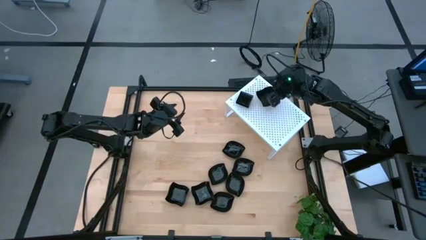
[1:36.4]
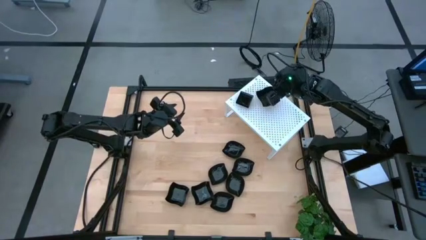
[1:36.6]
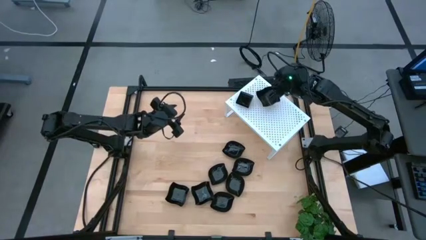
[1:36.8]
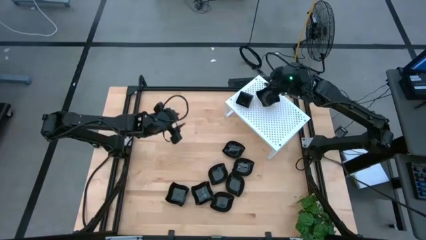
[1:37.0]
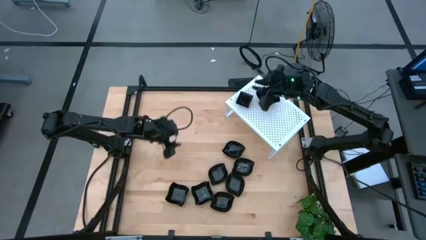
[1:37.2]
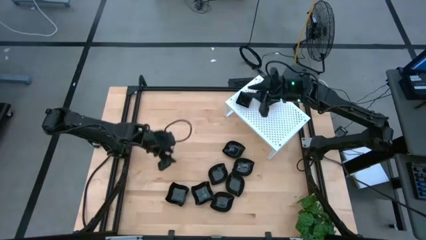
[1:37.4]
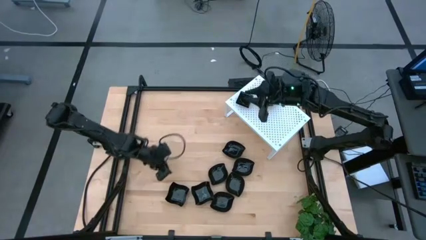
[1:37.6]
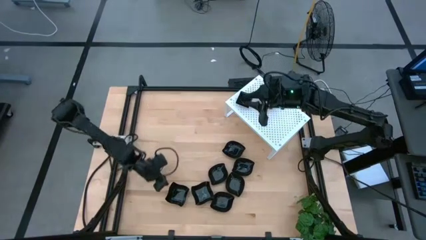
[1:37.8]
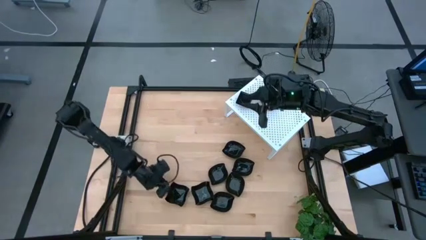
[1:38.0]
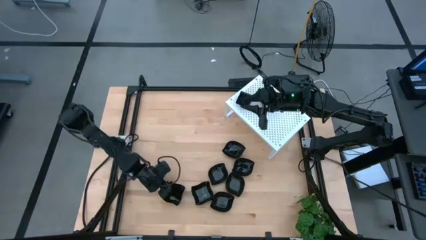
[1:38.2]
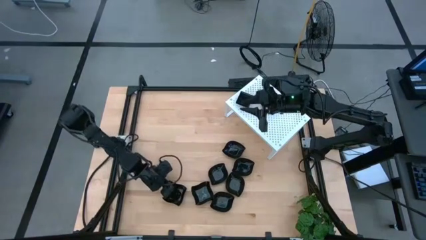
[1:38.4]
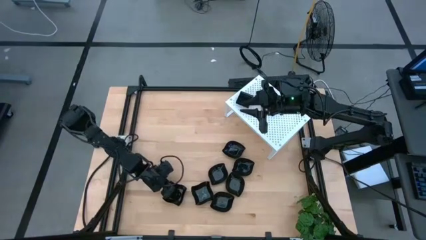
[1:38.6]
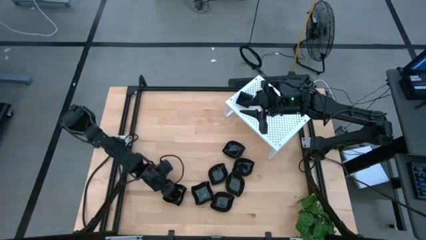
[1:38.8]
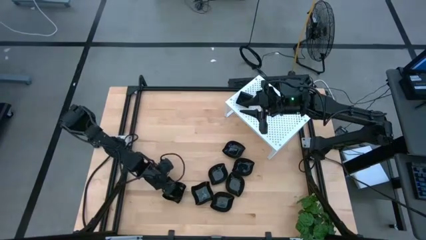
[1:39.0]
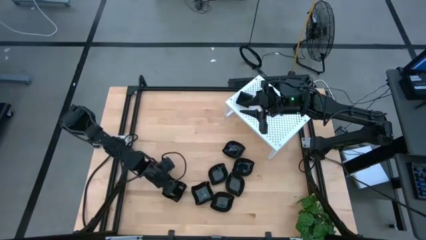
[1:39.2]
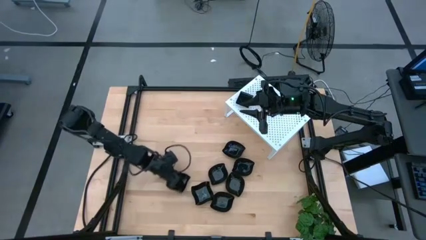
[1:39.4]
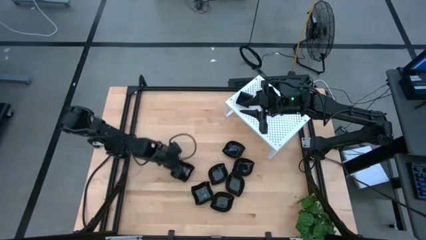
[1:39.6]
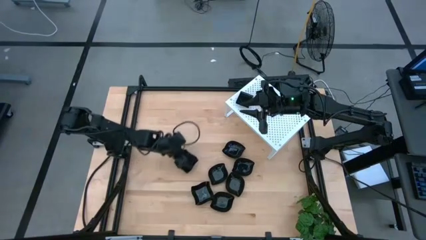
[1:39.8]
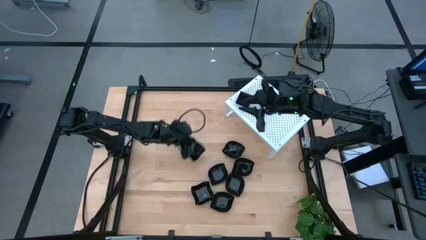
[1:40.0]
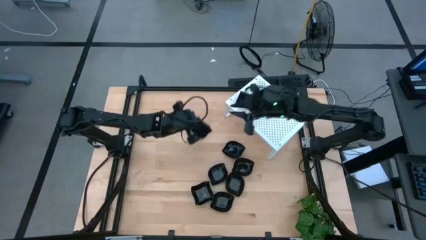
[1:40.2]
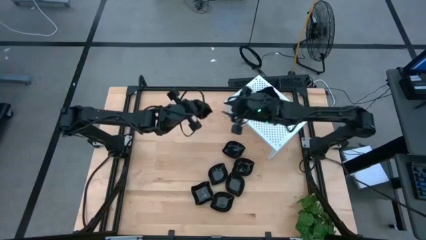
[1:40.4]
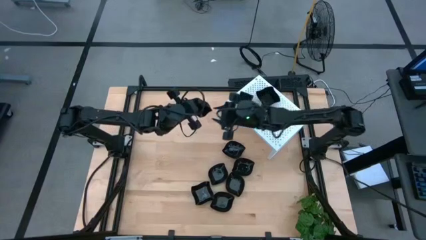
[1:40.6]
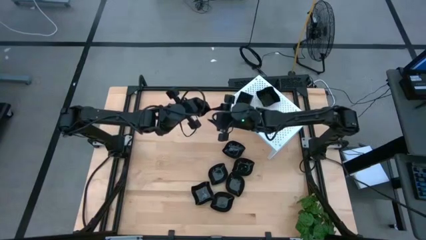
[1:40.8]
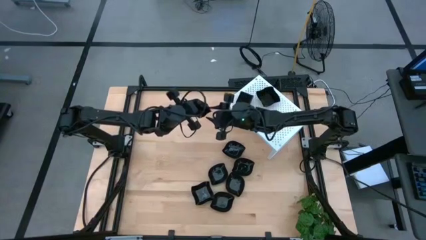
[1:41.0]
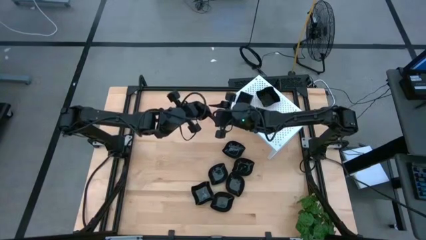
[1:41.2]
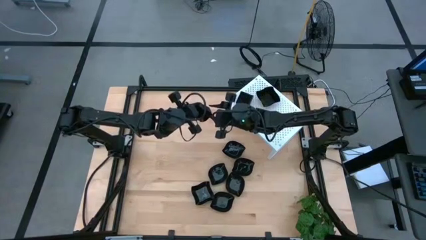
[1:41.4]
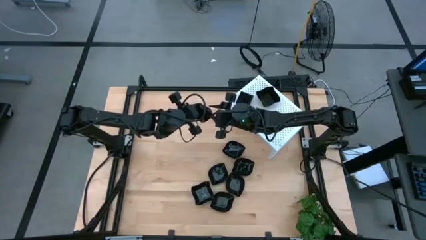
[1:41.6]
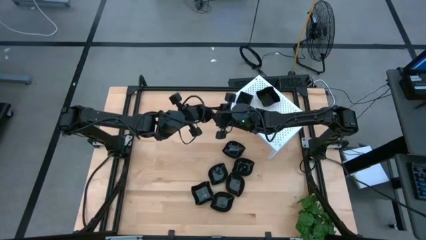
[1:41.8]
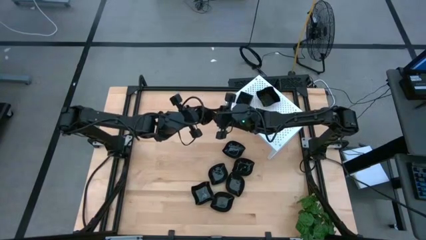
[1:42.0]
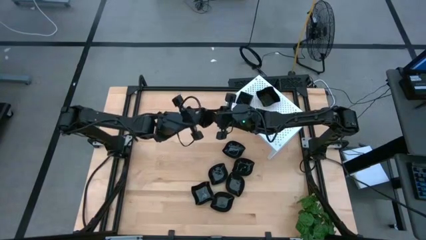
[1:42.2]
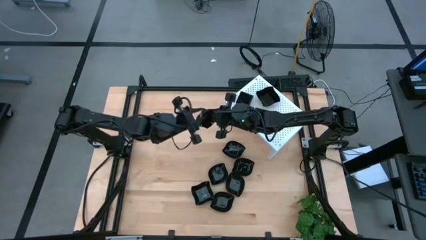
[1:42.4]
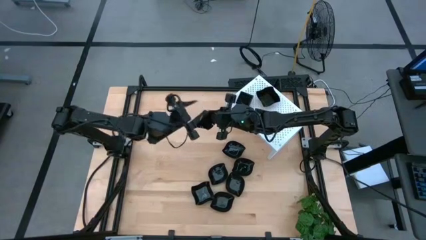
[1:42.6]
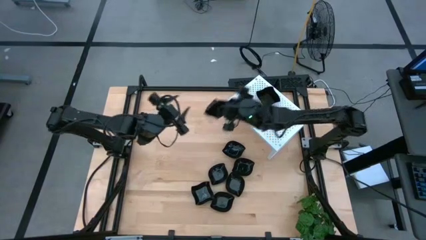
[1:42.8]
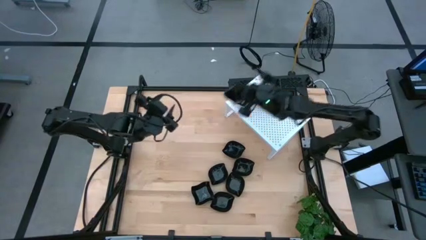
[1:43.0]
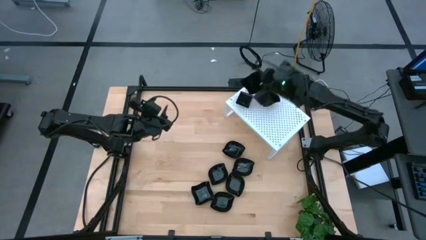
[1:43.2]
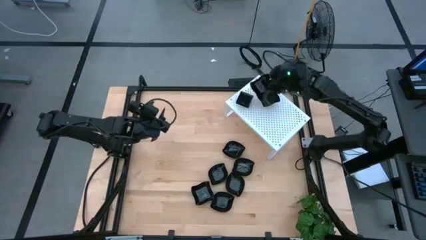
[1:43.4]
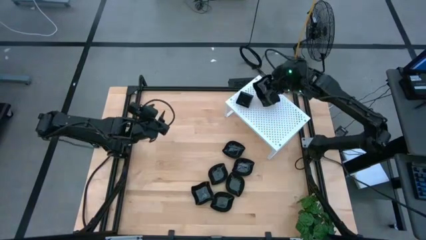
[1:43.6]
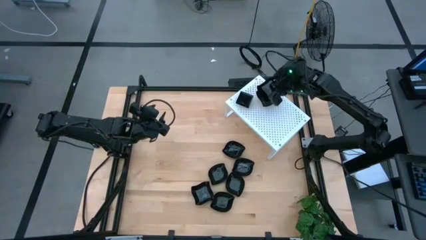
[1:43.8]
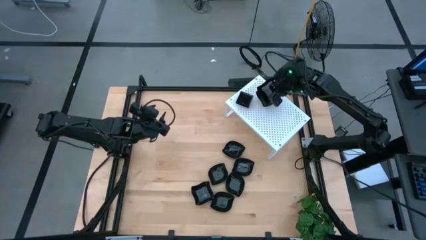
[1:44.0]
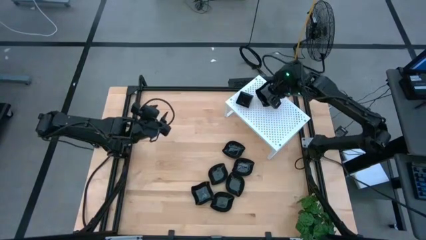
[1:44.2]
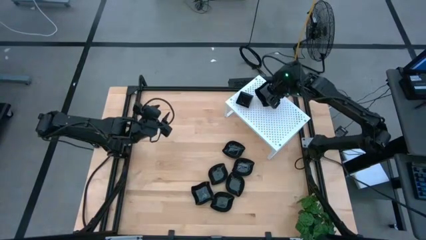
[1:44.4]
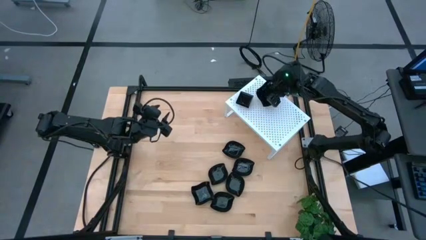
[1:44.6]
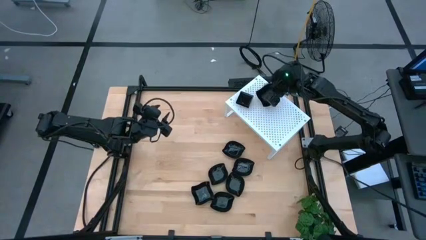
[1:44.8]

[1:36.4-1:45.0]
Task: Pick & Place Mini shaped plates
Stack the distorted square plate on top of the other distorted square plates on the shelf

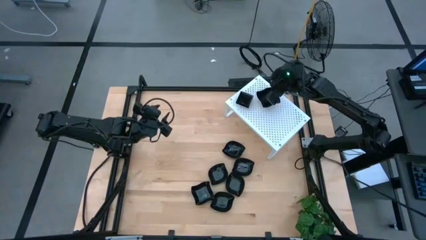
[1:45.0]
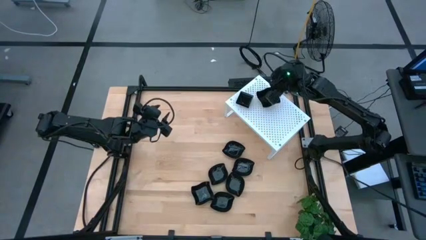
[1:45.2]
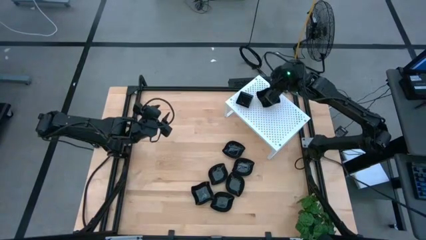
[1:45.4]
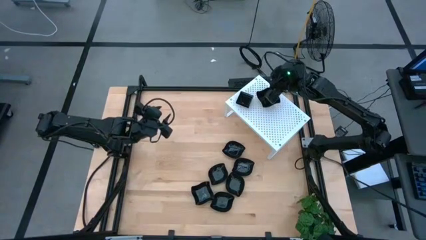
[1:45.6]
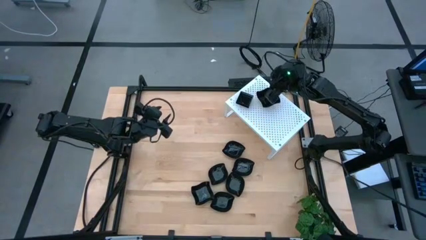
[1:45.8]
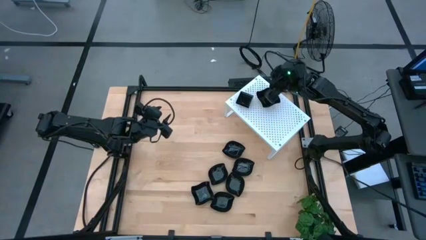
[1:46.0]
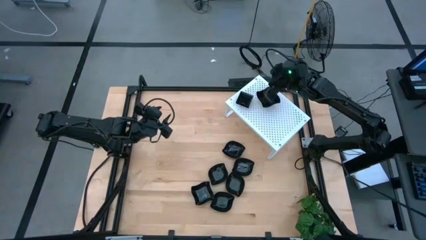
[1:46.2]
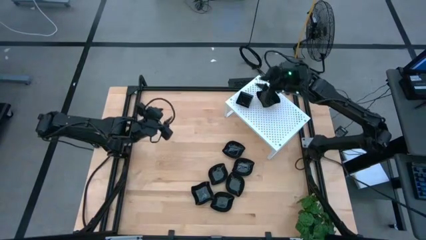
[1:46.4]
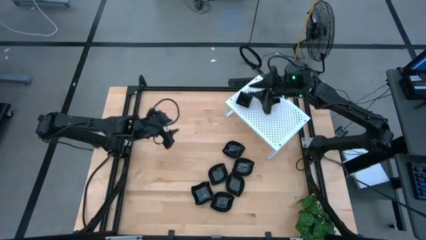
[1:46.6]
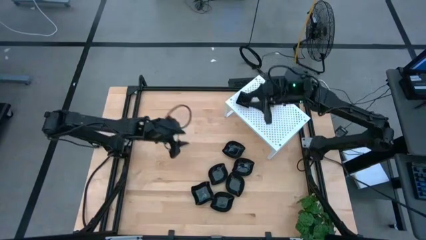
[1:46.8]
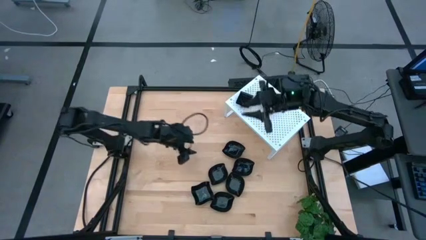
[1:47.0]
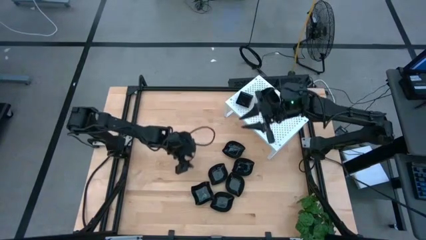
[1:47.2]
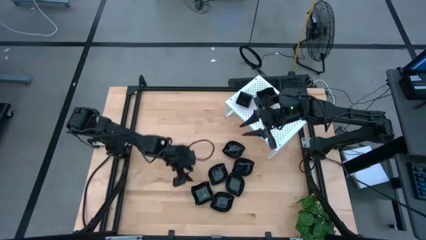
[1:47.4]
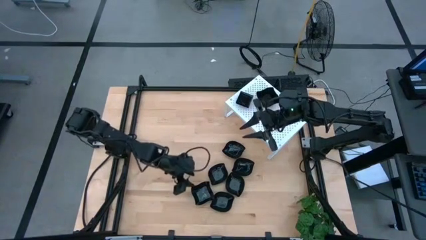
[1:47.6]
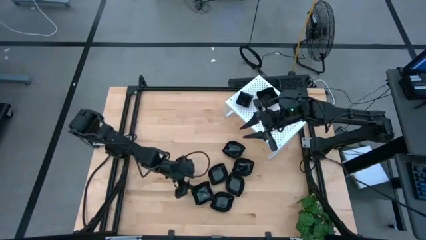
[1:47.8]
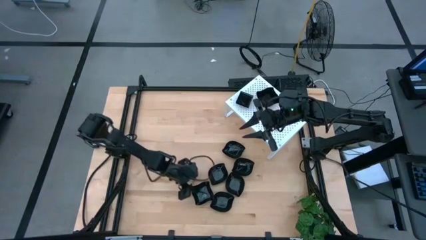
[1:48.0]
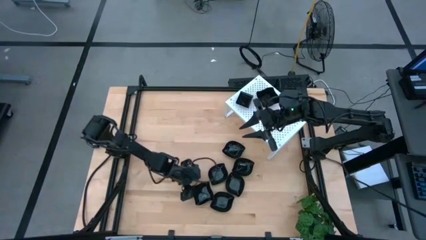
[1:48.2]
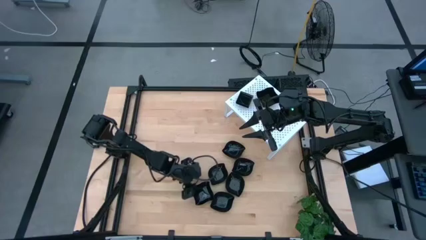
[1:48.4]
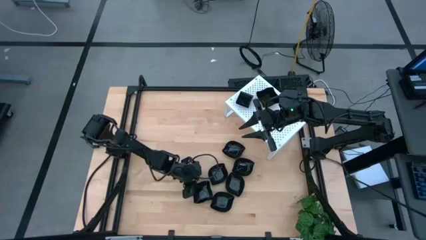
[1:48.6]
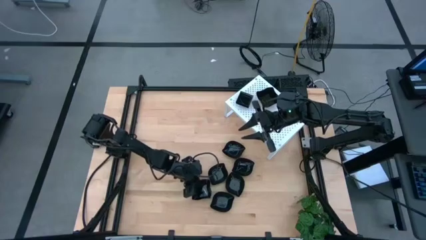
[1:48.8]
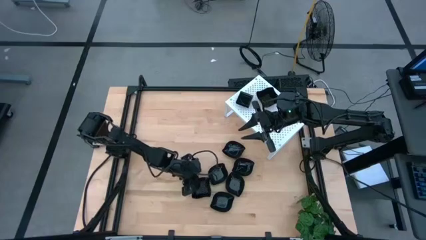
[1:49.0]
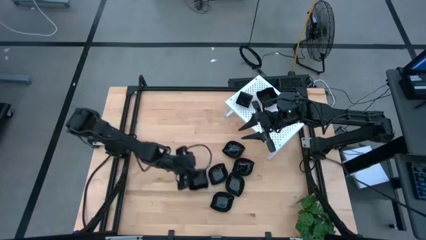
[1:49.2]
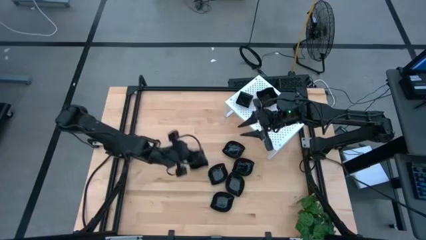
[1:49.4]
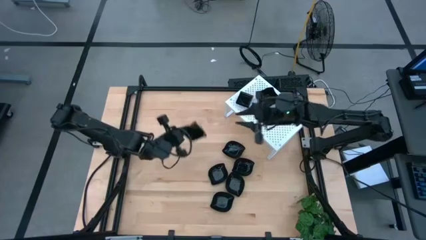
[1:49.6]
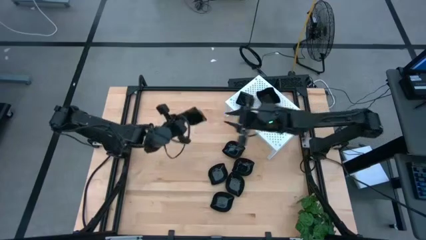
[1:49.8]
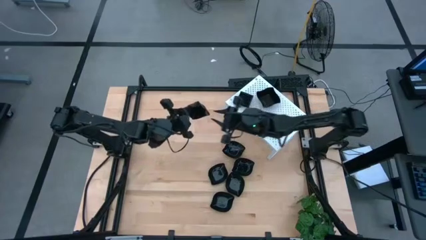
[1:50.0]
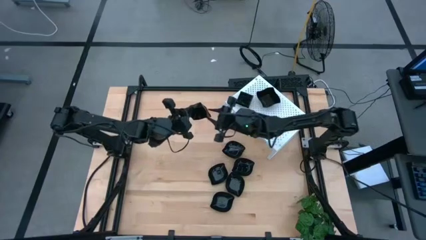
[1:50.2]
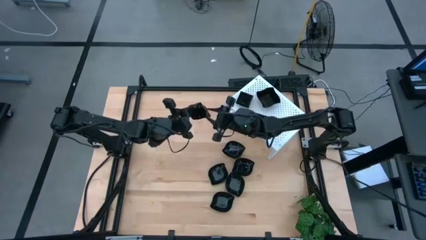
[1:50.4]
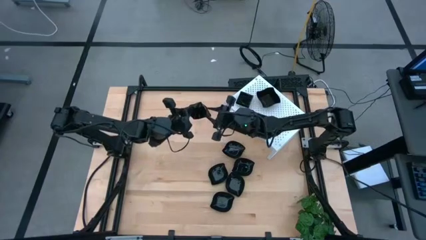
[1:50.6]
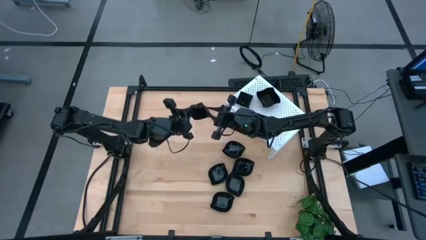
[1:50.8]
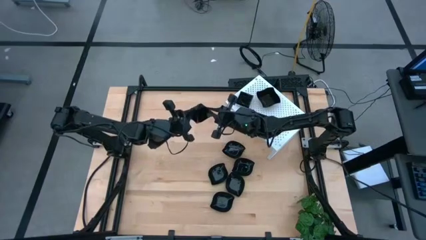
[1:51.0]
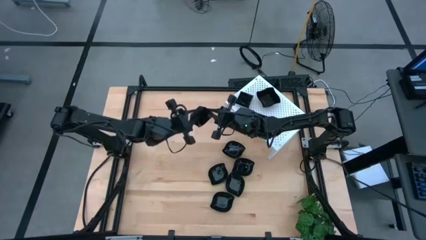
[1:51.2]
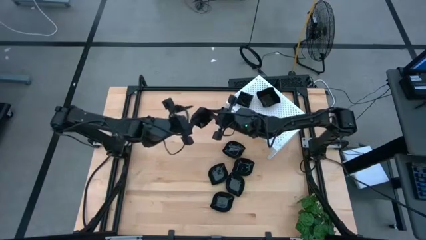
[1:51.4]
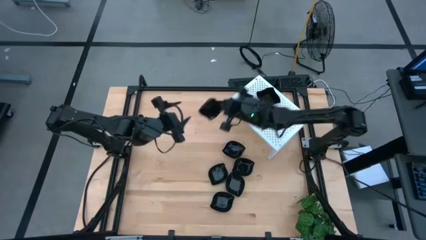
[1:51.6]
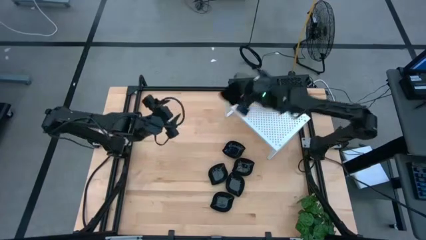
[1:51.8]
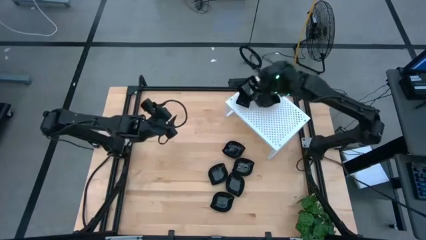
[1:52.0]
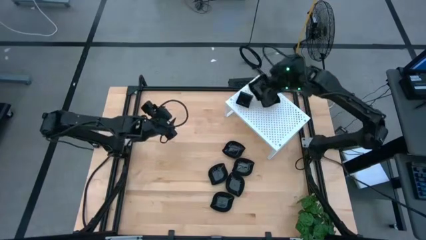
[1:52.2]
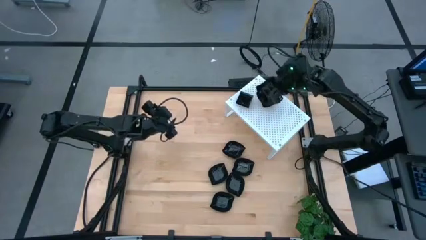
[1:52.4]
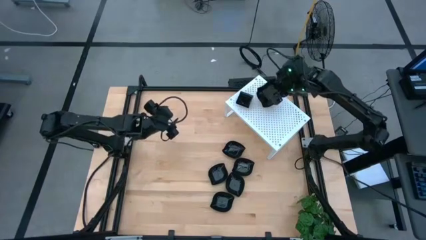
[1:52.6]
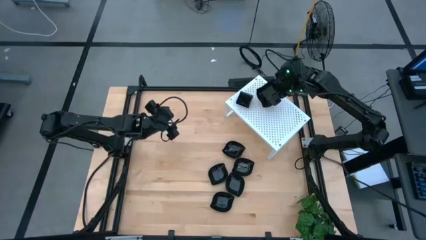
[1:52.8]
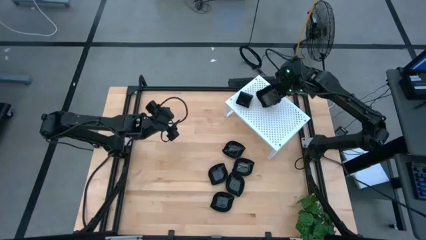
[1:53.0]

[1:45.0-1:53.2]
Stack the distorted square plate on top of the other distorted square plates on the shelf
